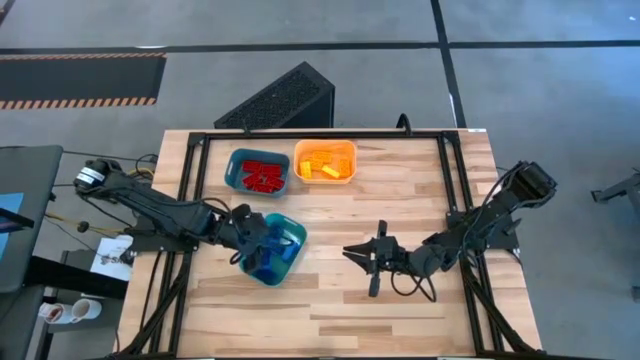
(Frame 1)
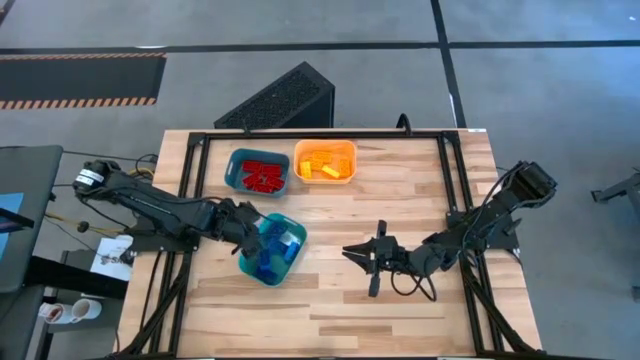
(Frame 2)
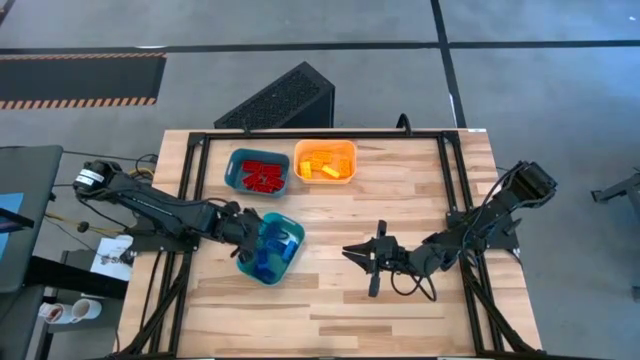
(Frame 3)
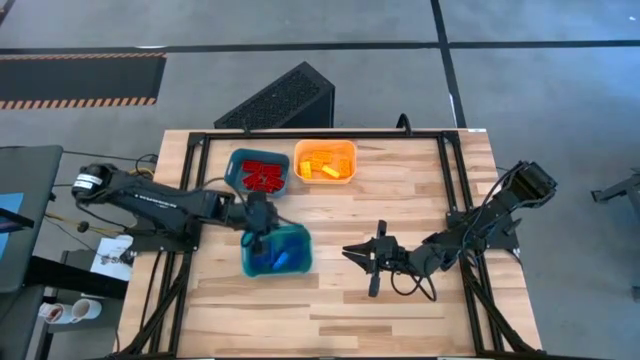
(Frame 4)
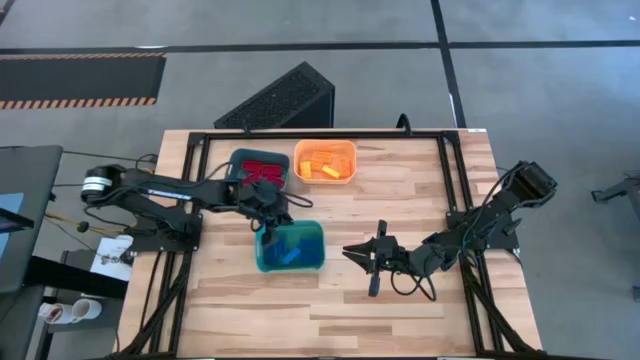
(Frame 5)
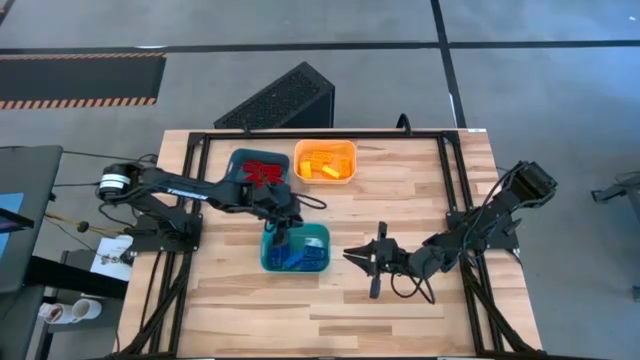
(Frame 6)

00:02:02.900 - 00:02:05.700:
Task: Sort & place blocks by color
Adjust the green bin

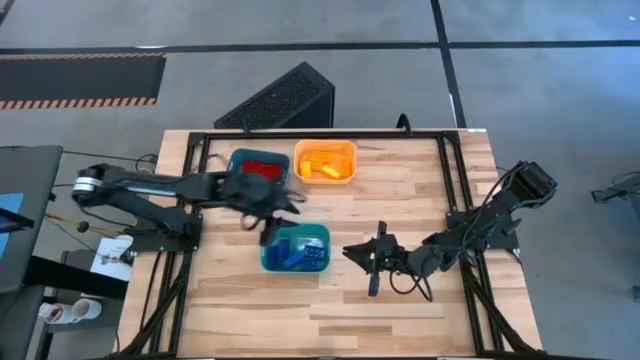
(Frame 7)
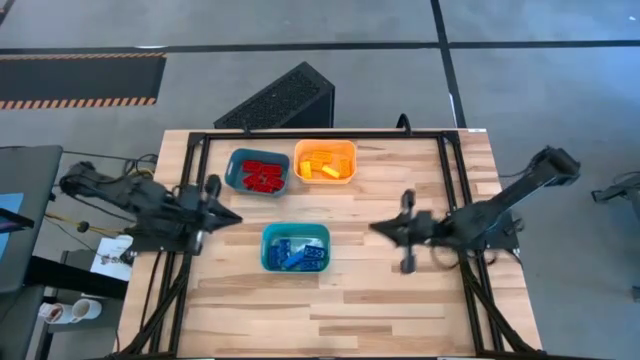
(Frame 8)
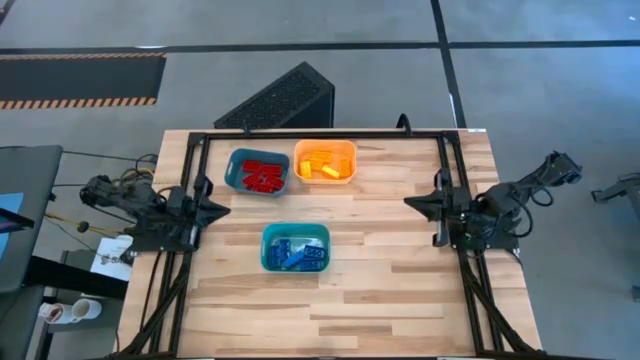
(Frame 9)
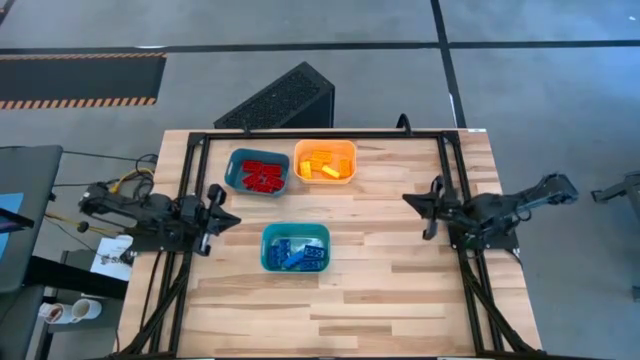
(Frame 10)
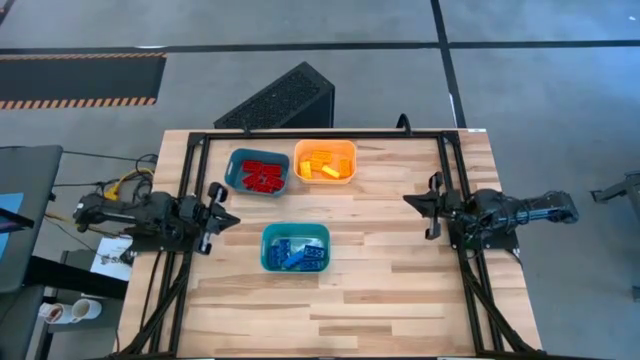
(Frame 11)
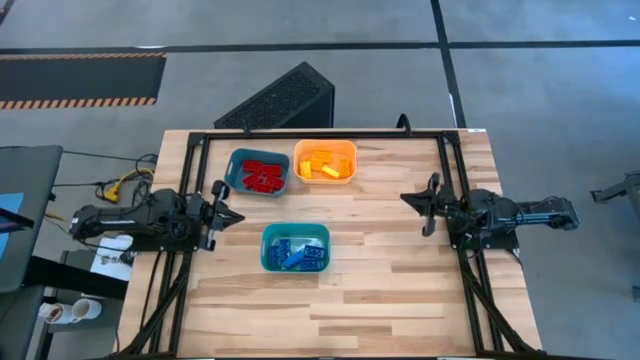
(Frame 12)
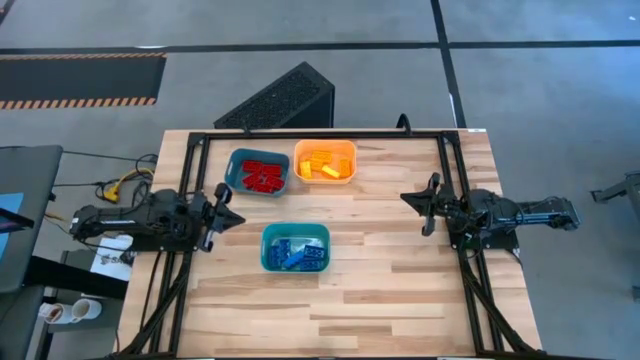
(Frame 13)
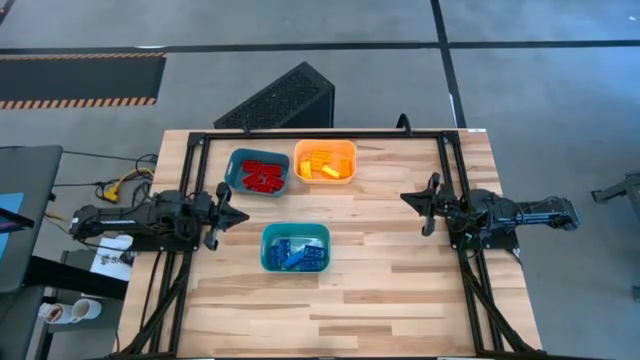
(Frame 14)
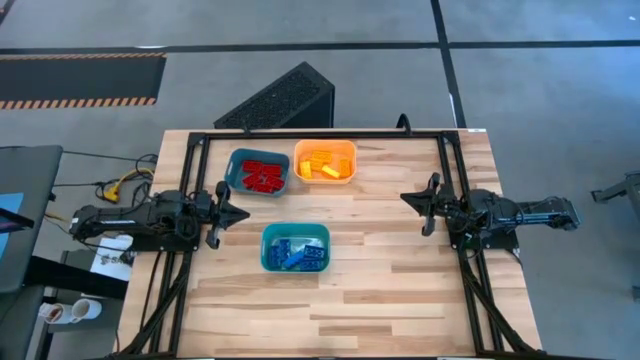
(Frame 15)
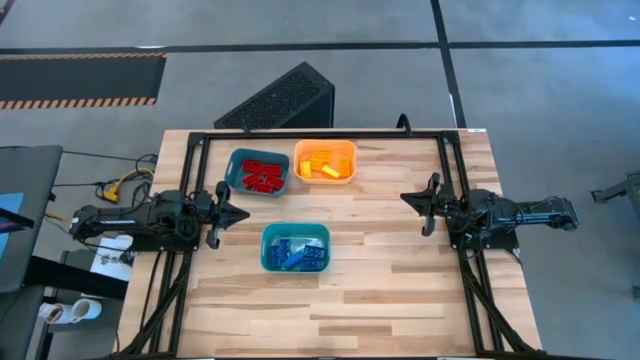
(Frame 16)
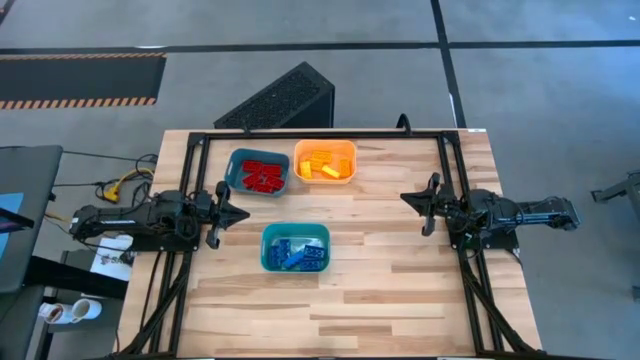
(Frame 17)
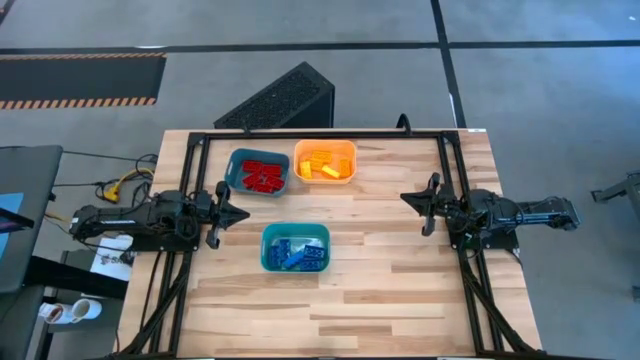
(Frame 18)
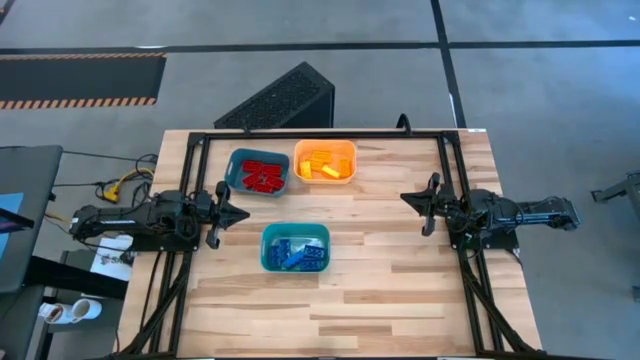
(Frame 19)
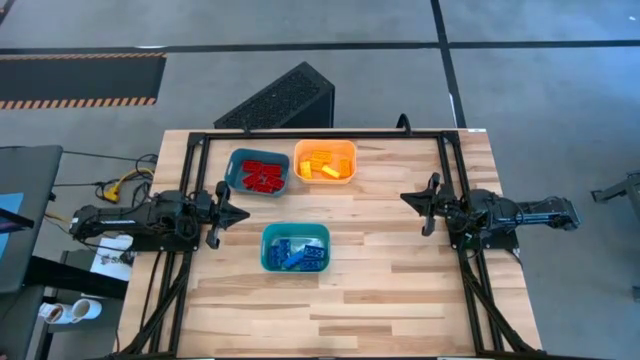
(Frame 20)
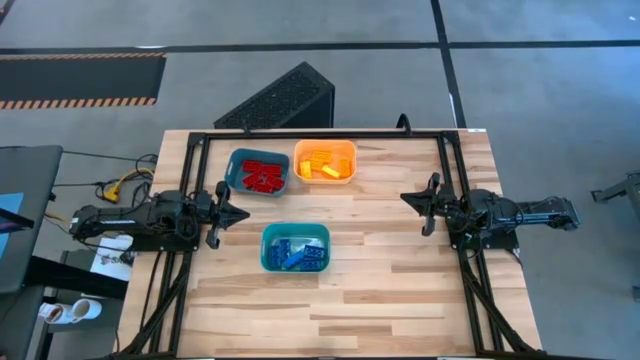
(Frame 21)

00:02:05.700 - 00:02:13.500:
Return to Home Position

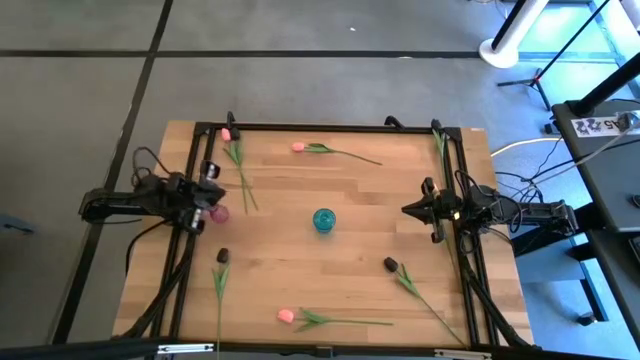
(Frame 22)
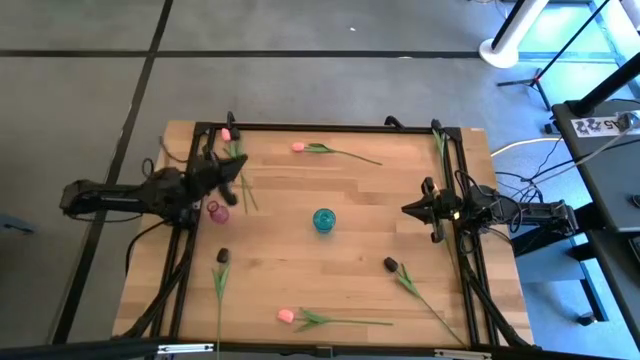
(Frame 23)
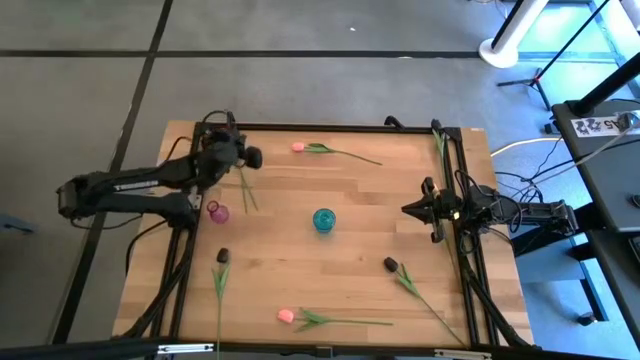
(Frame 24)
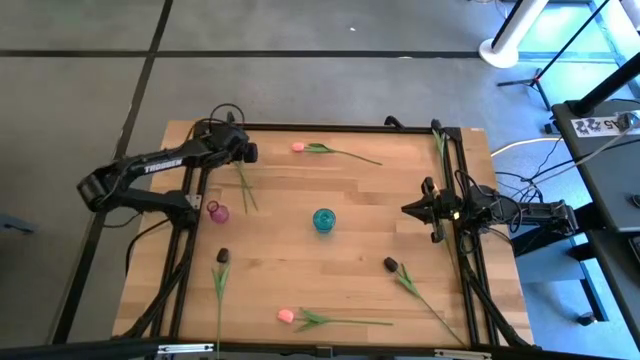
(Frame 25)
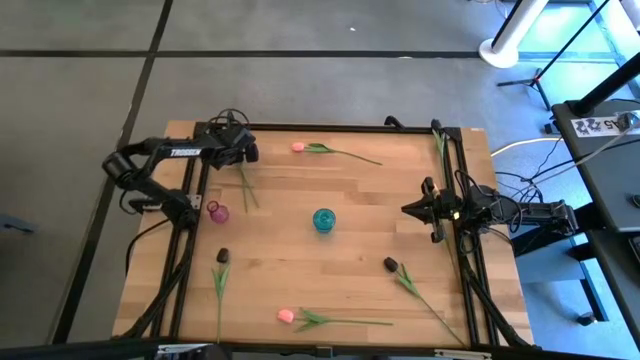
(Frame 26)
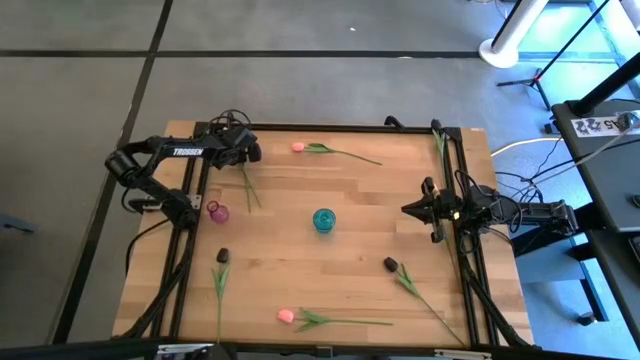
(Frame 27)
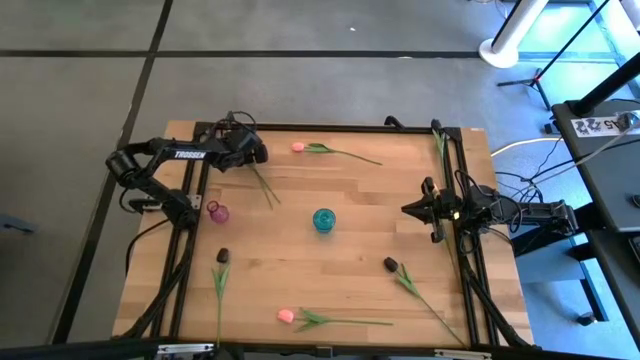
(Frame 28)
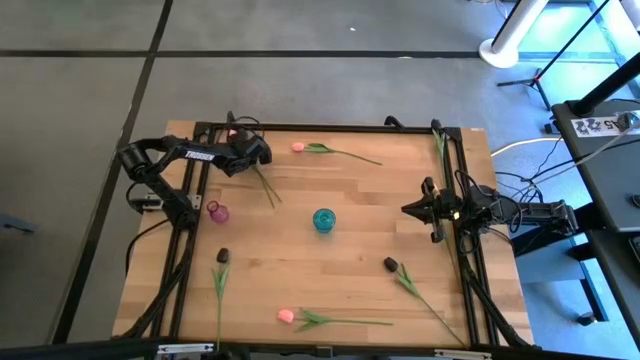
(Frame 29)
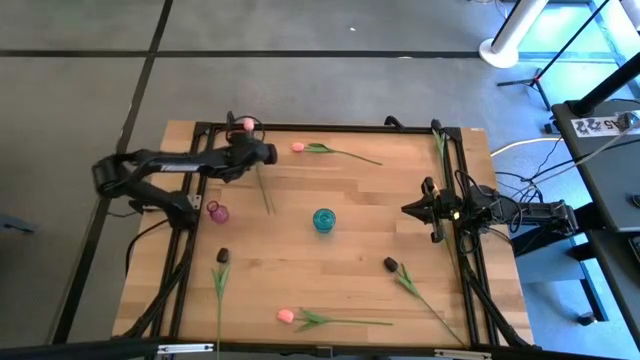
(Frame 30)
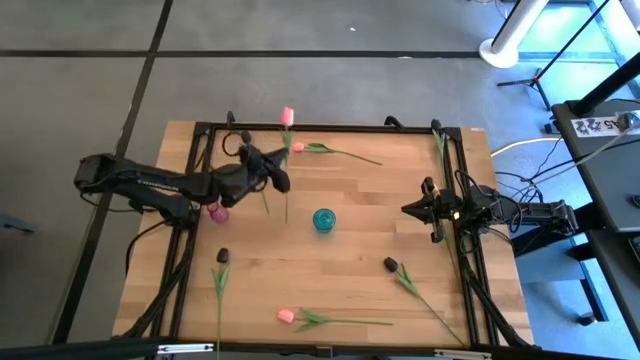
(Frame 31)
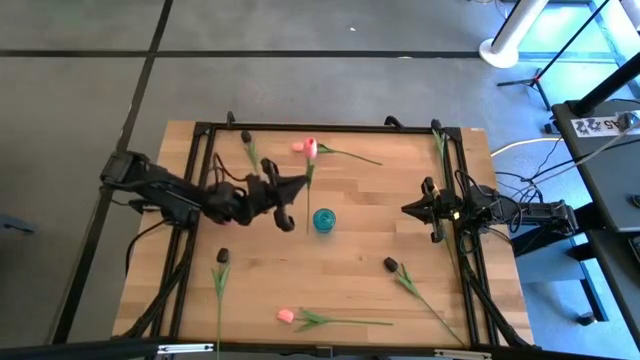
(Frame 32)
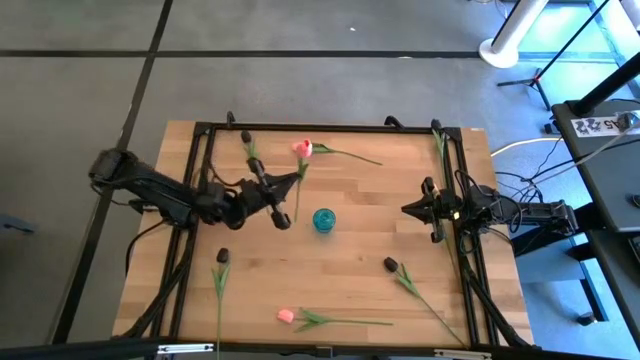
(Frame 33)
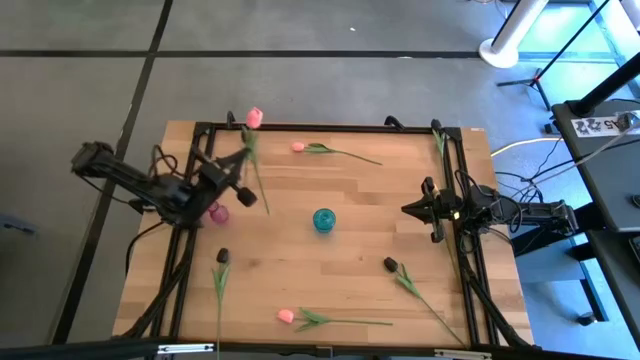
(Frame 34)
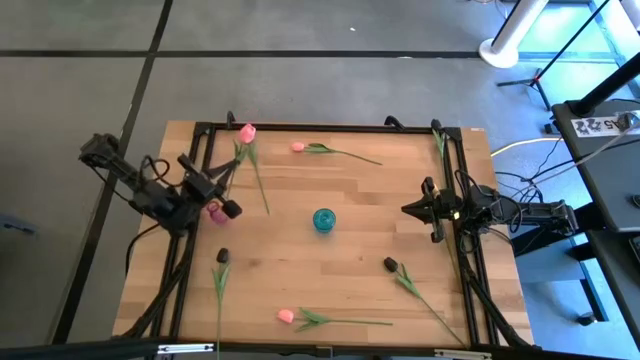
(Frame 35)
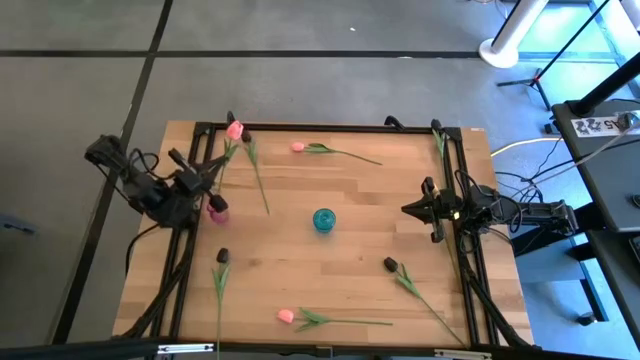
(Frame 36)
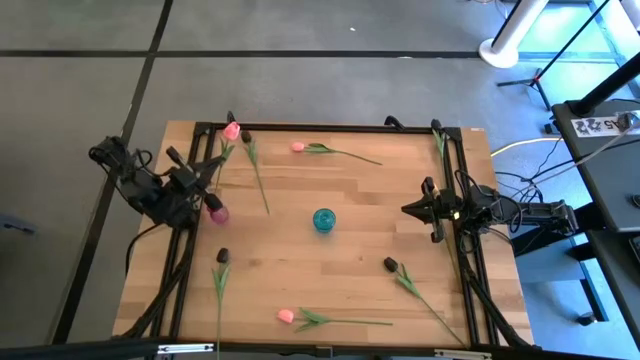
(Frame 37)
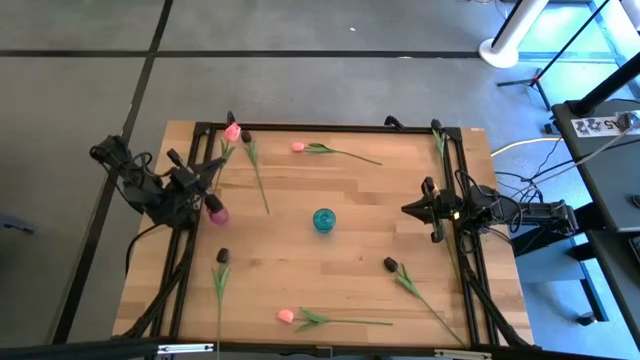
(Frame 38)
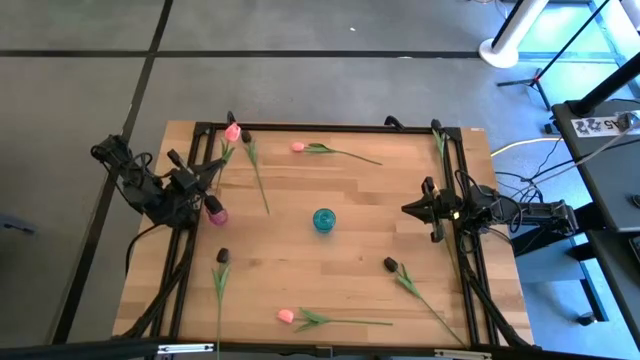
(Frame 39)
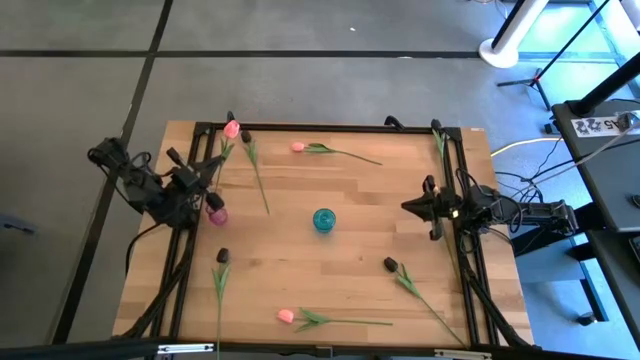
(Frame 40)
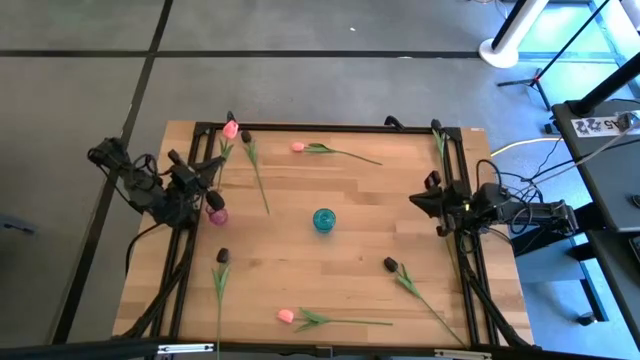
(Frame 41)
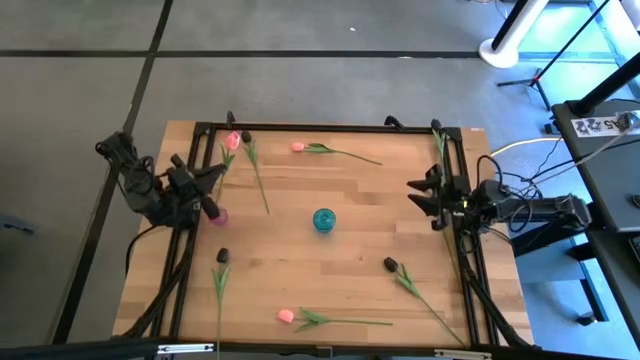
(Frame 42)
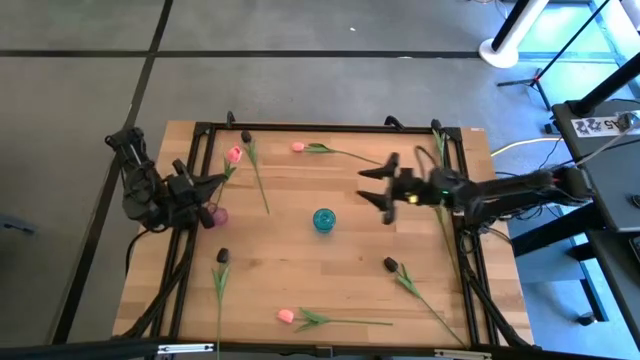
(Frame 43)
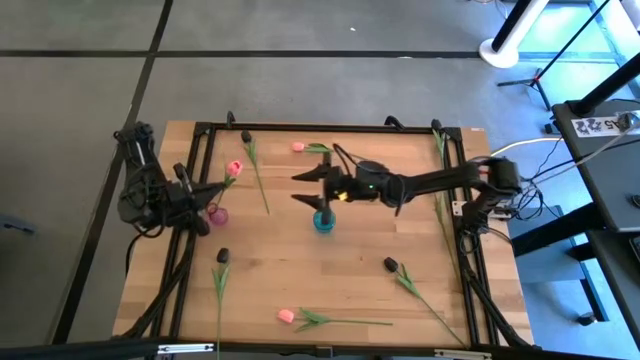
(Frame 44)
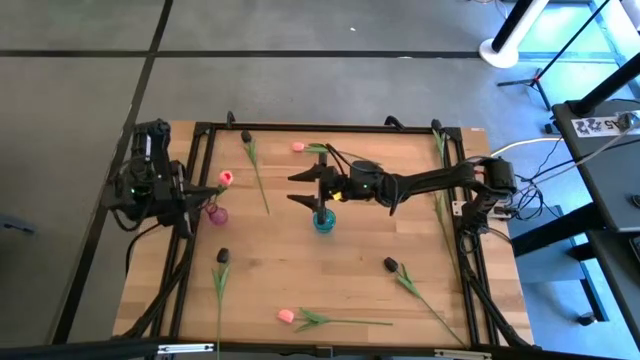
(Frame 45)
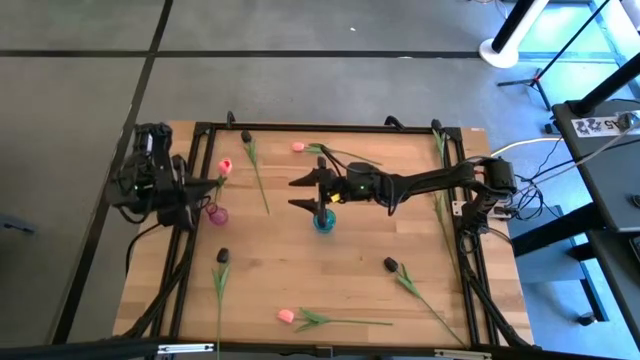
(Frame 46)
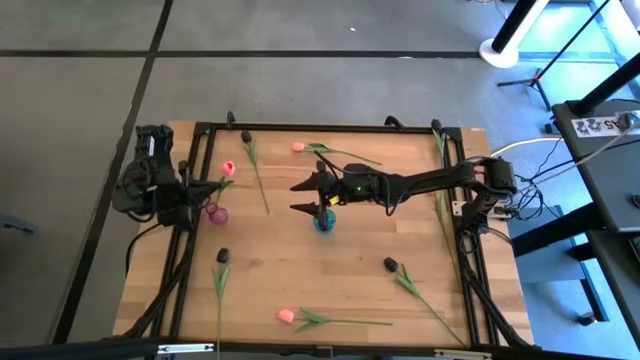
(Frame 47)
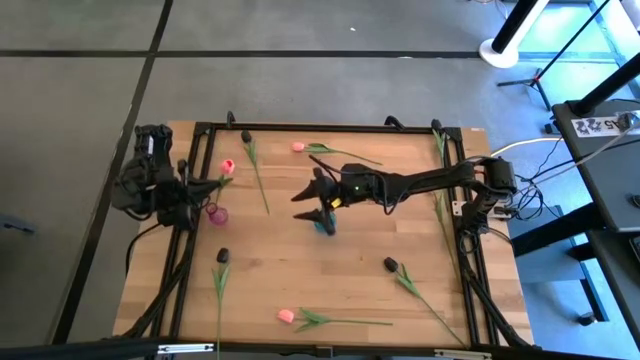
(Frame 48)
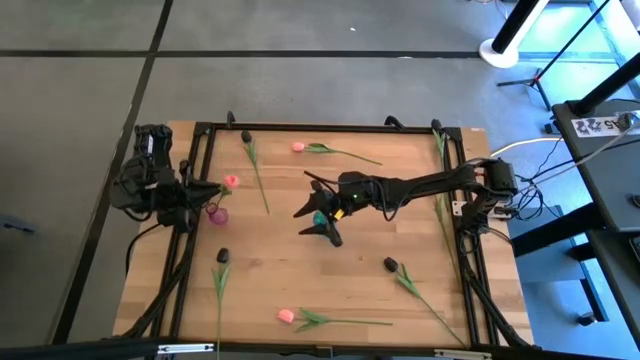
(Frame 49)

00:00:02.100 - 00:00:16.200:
Task: Sort flowers into vase by color
Put the top left pink tulip into the purple vase
